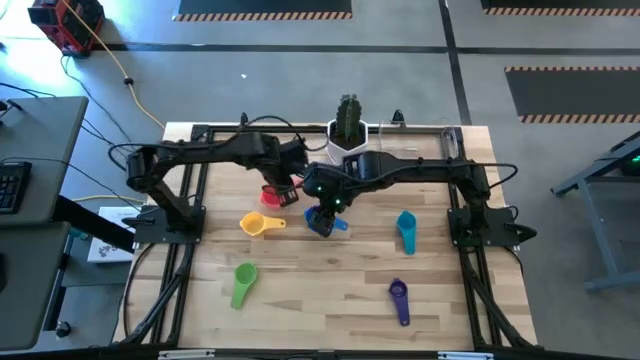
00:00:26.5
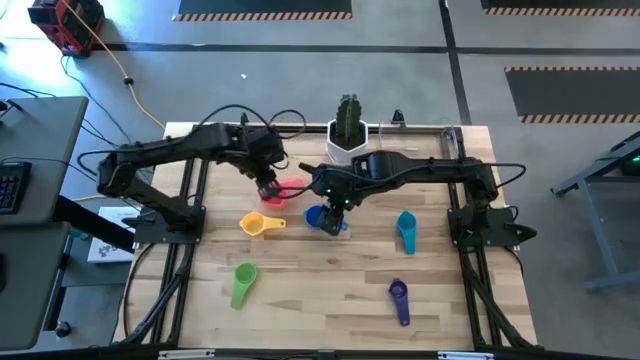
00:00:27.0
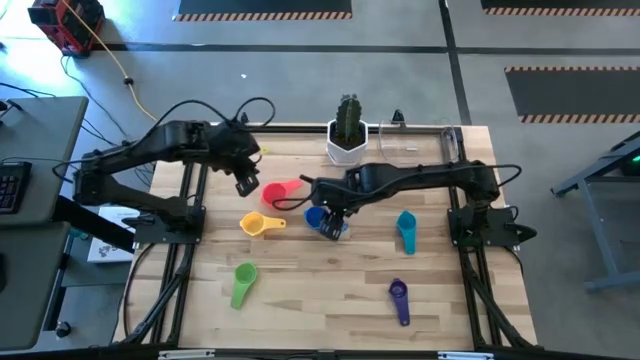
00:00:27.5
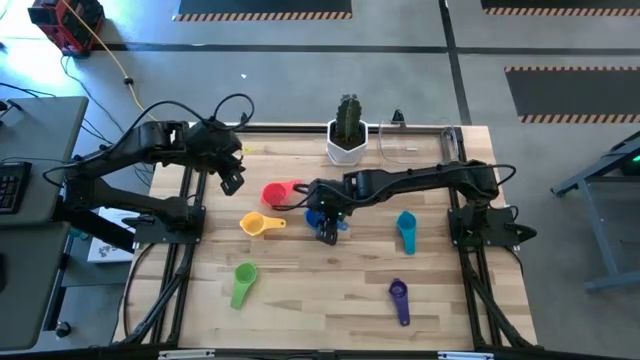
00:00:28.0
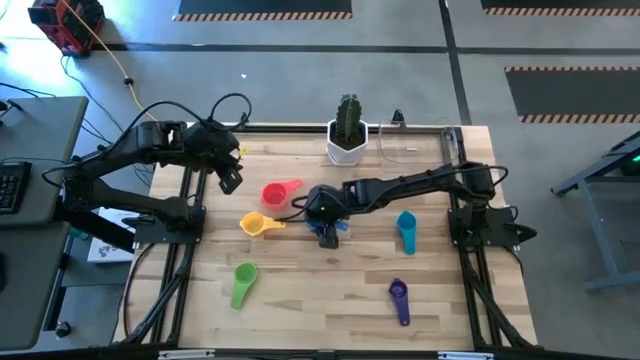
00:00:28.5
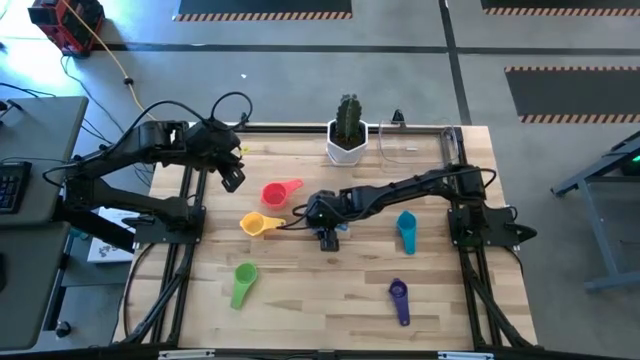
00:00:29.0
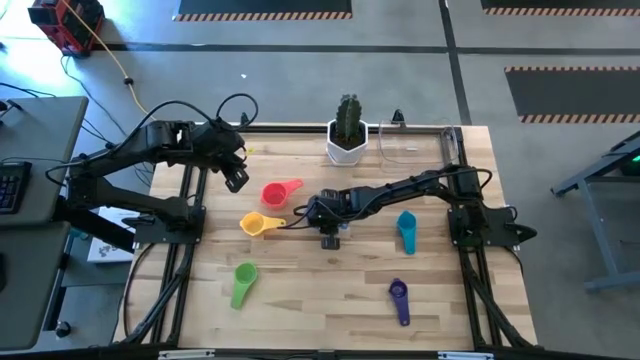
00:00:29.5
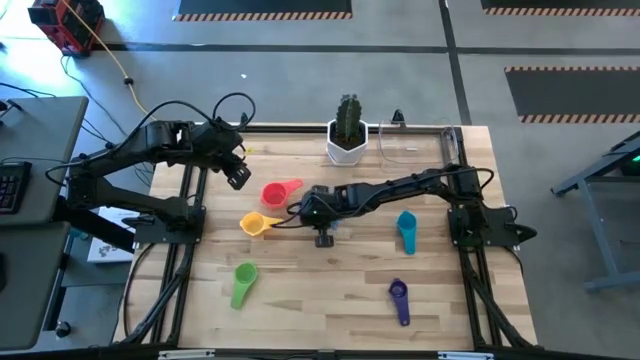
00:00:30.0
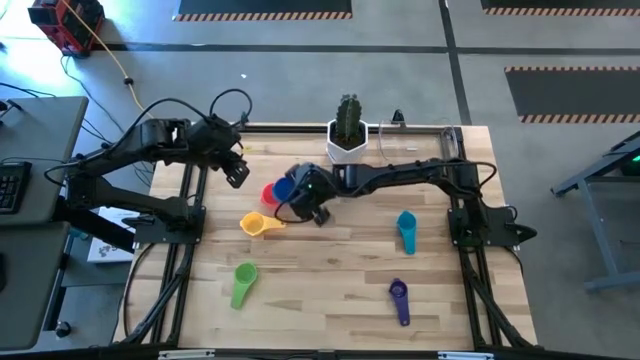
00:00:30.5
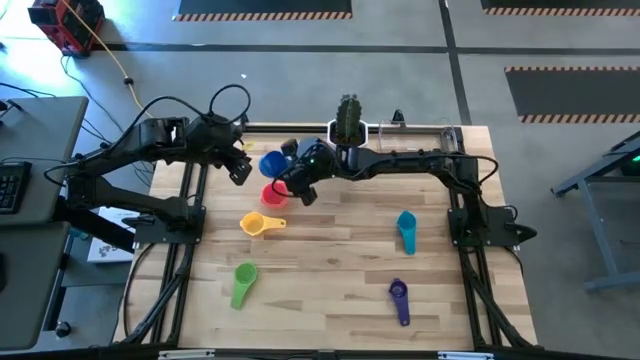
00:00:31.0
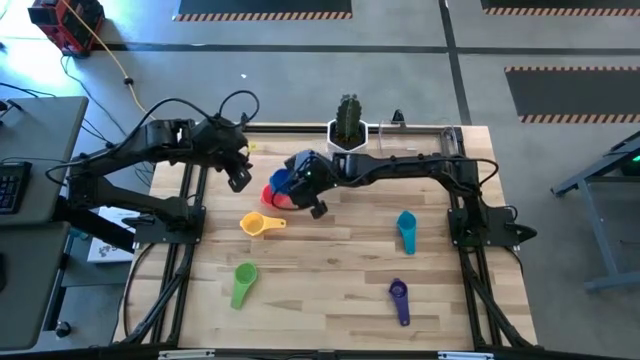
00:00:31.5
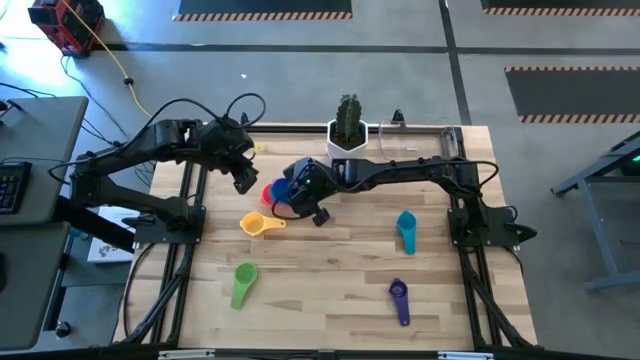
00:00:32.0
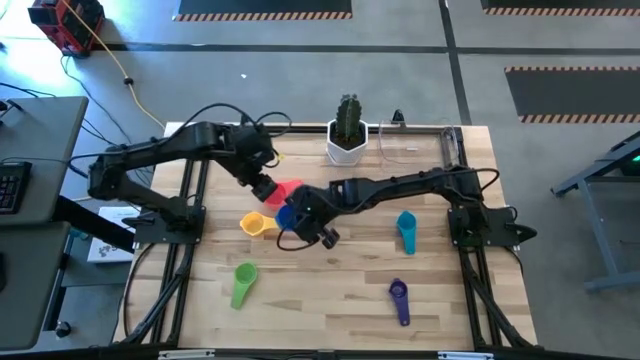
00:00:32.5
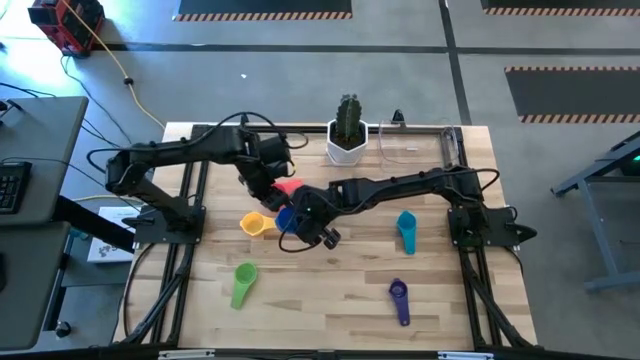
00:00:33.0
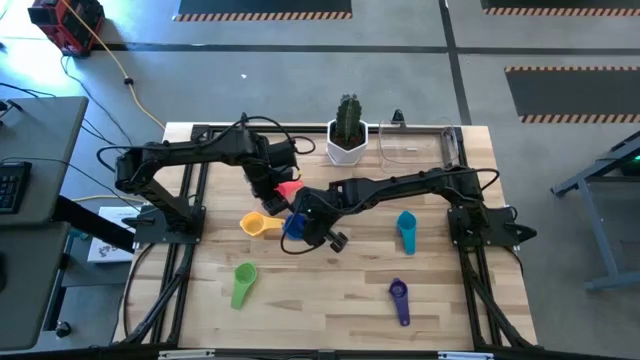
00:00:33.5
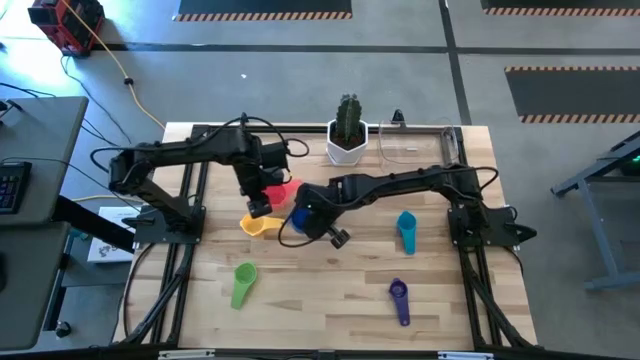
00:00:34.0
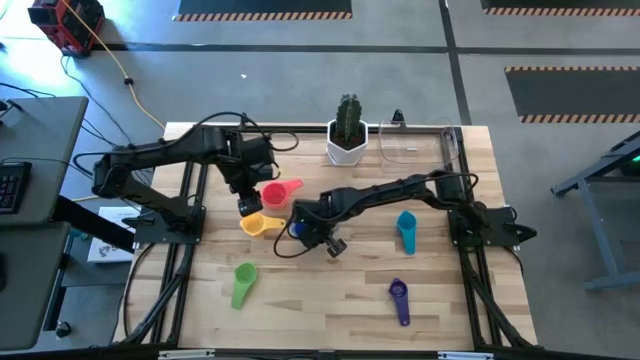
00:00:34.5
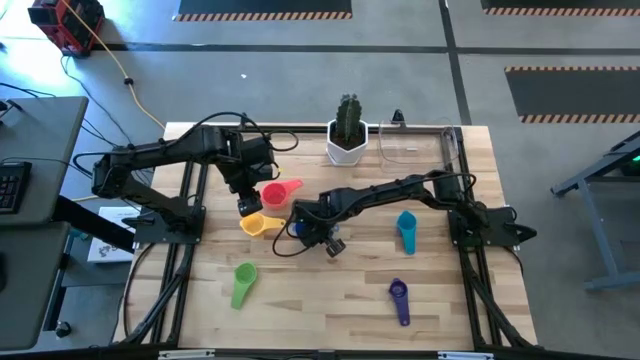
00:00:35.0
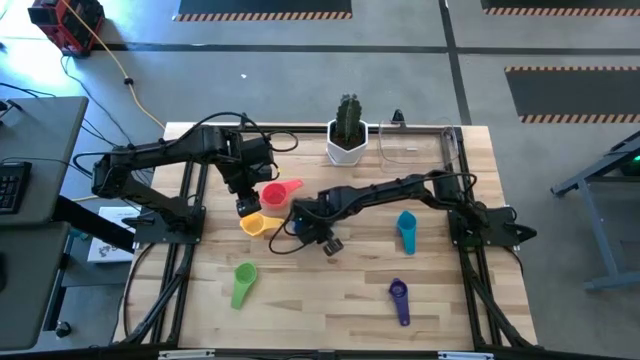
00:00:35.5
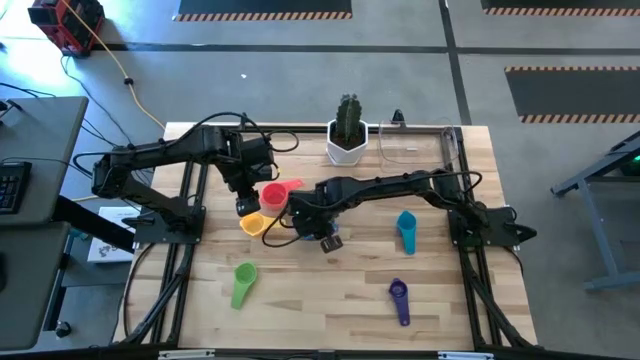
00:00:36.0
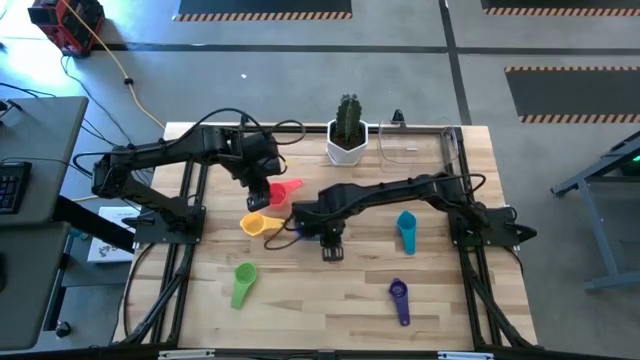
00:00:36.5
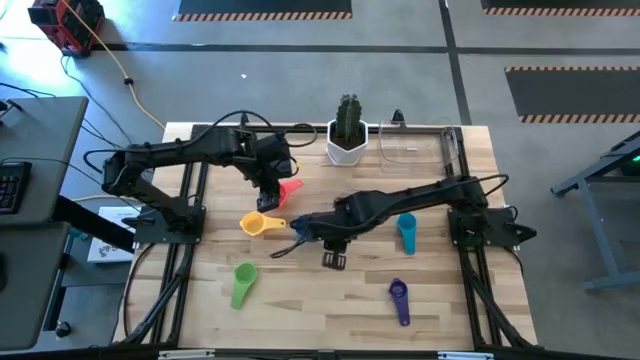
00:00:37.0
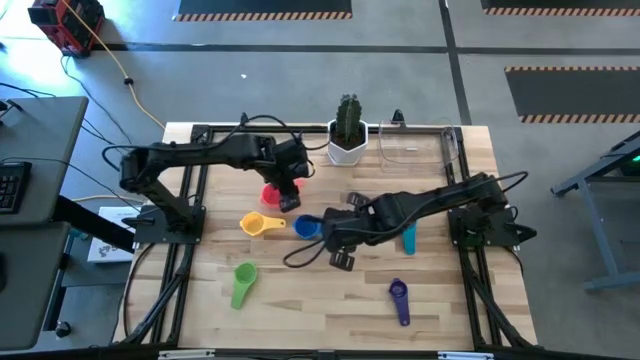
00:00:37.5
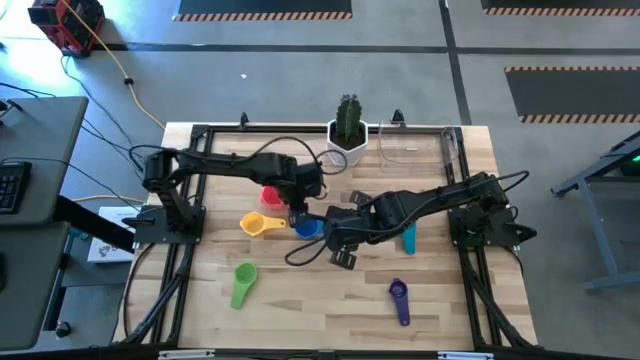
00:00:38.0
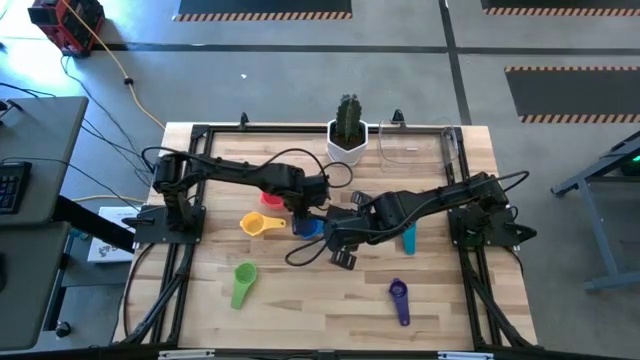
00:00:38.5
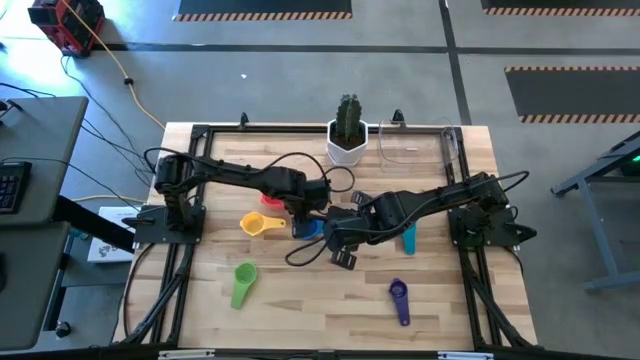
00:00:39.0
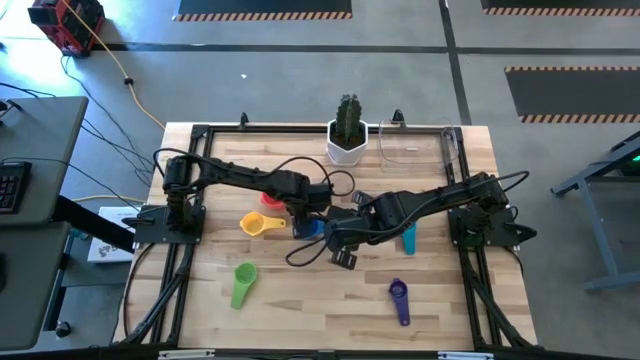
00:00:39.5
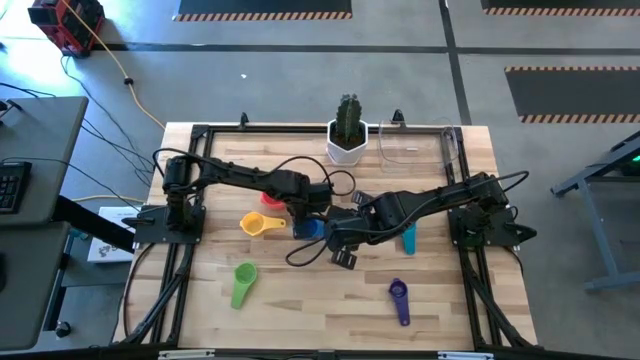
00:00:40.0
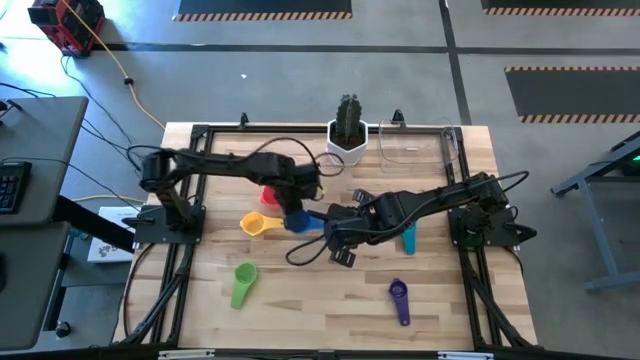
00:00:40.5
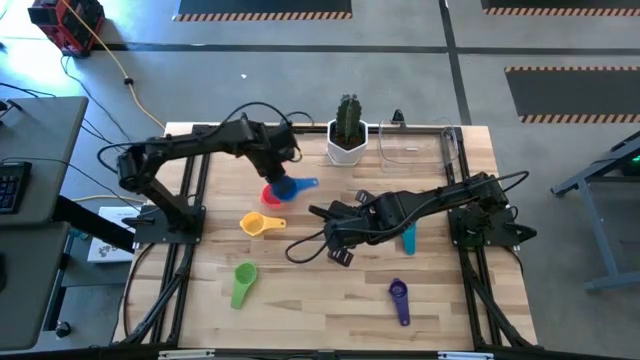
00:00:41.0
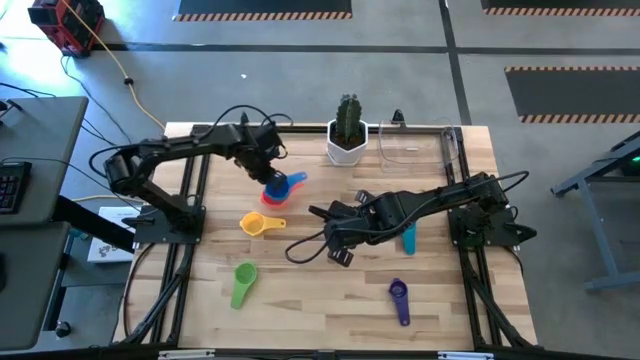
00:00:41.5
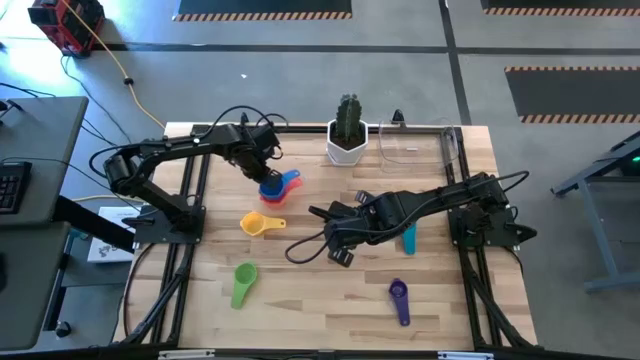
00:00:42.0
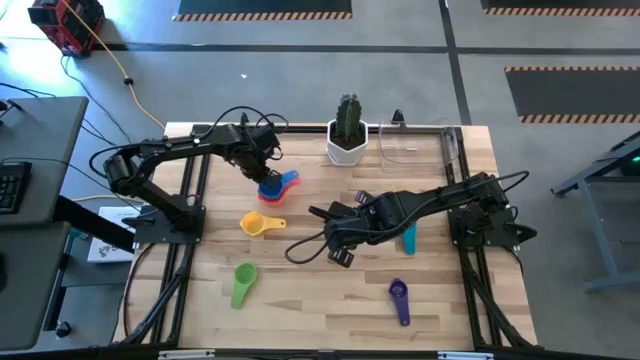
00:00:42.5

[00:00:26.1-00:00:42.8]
Task: Nest measuring cups in basket
Stack the blue measuring cup on top of the red measuring cup

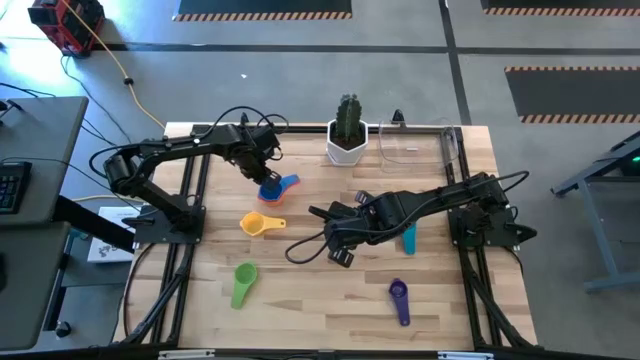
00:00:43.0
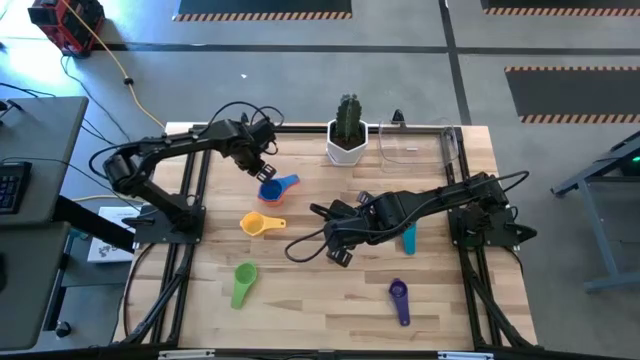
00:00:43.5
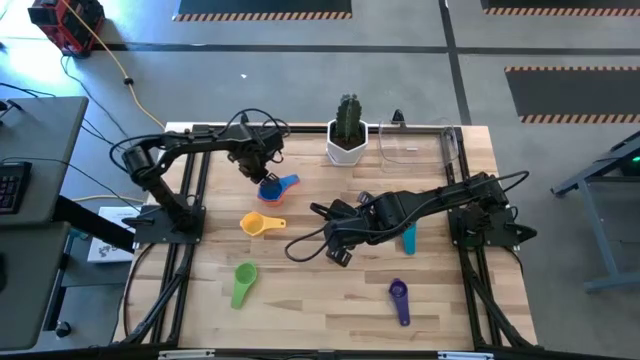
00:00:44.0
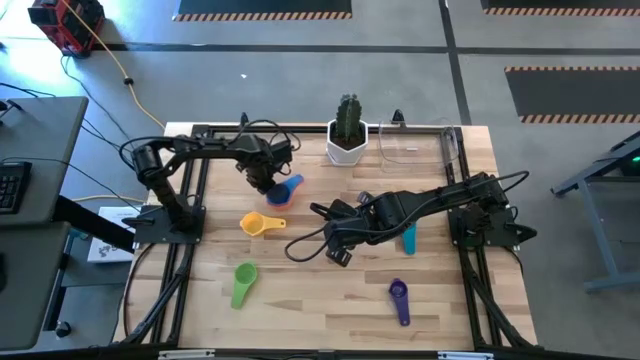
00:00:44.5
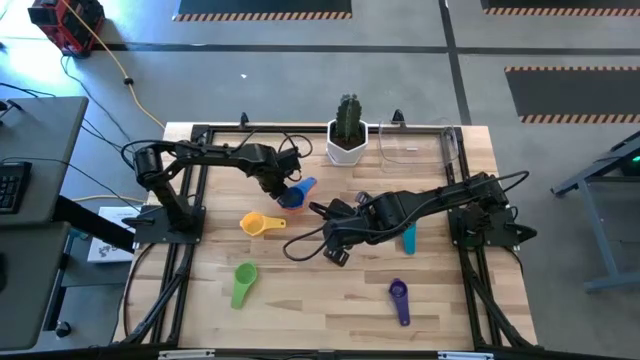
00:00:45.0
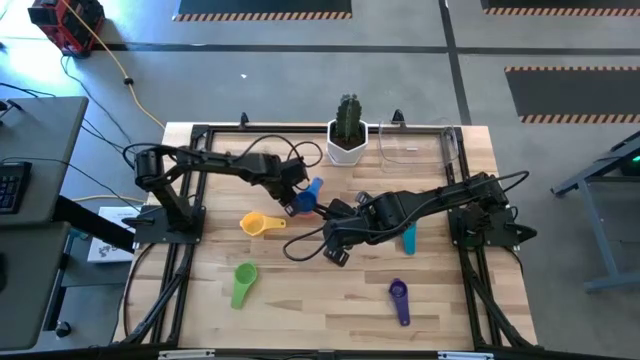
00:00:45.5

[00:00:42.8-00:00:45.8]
Move the stack of measuring cups to the center of the table

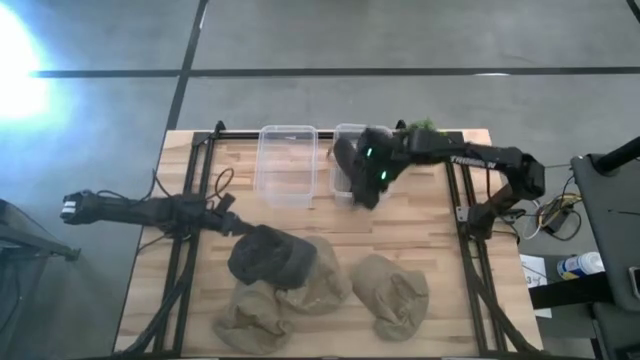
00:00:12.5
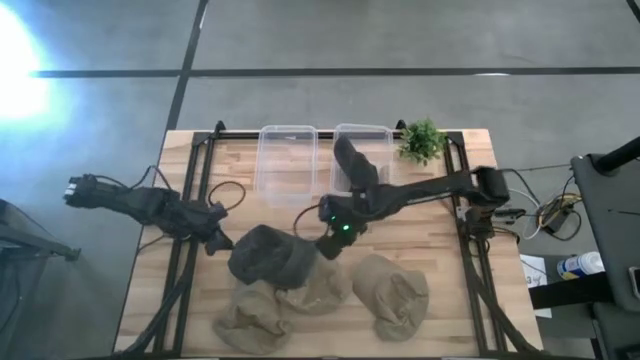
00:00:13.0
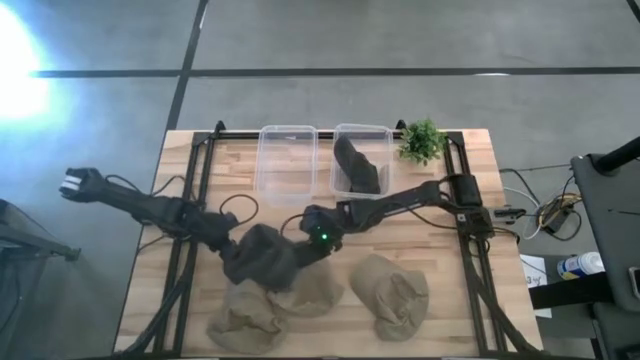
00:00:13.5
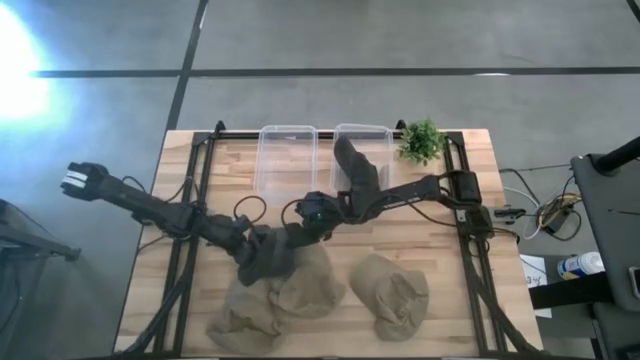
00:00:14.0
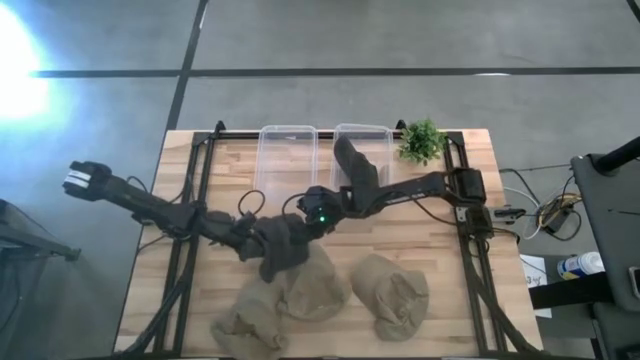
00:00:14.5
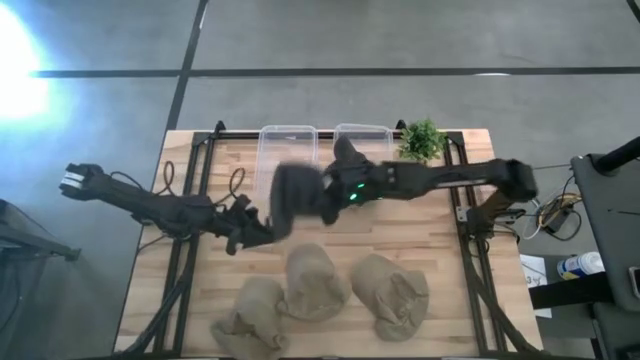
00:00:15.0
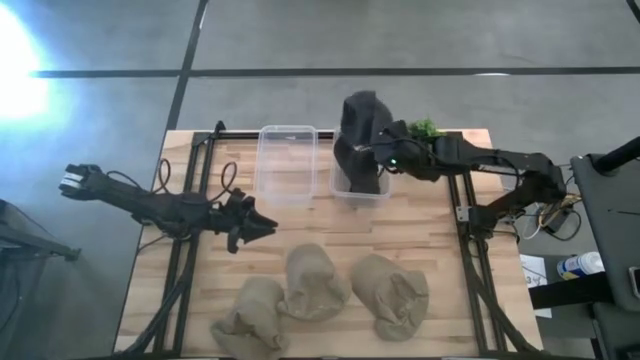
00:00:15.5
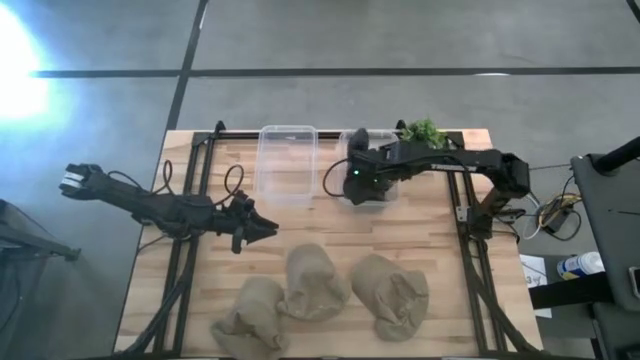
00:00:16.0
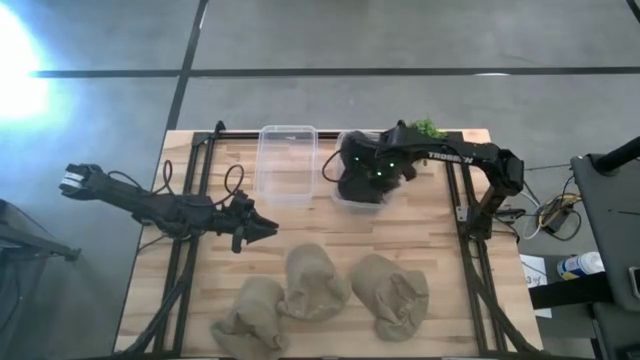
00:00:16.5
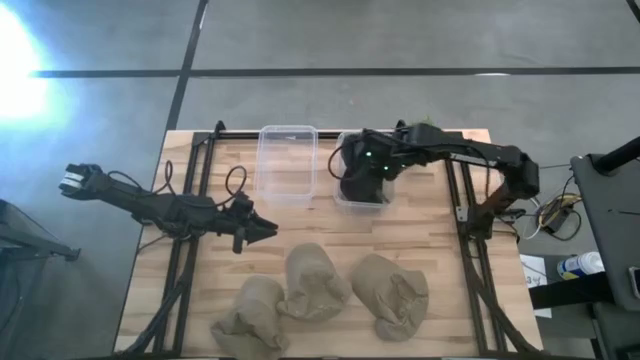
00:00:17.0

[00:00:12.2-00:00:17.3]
Task: Pick & Place hat
Put the black cap into the right transparent bin
